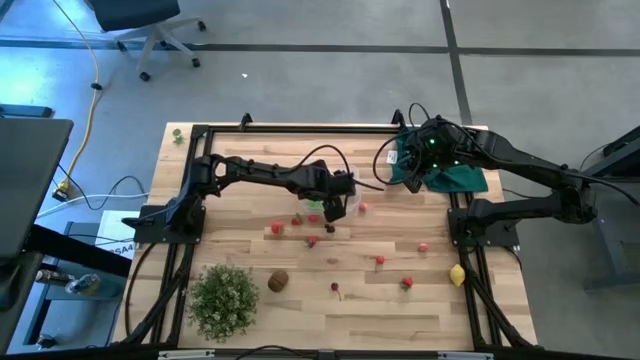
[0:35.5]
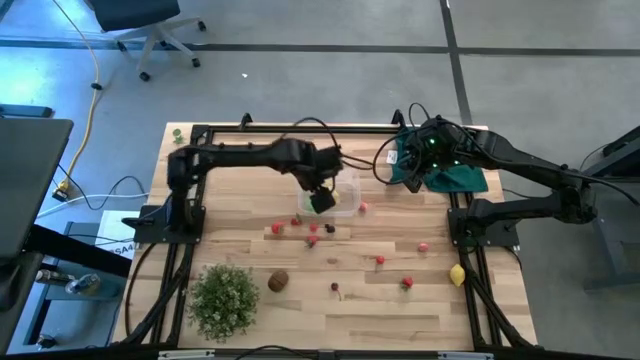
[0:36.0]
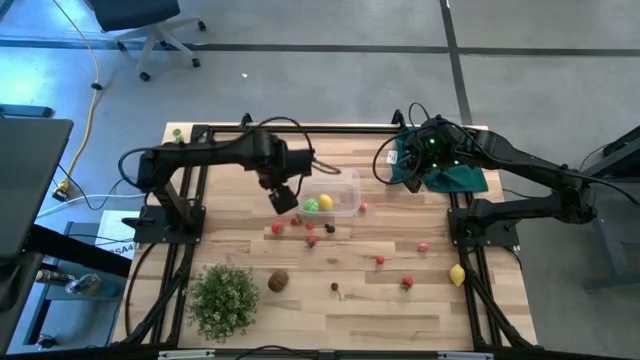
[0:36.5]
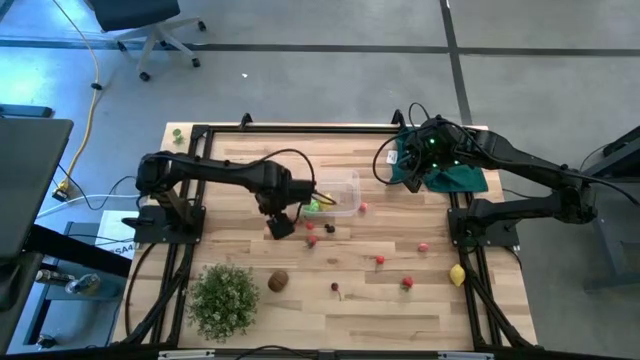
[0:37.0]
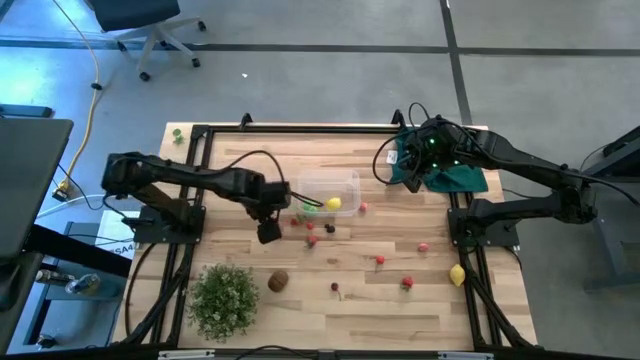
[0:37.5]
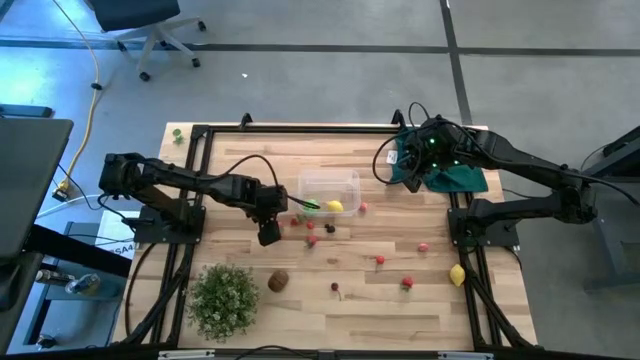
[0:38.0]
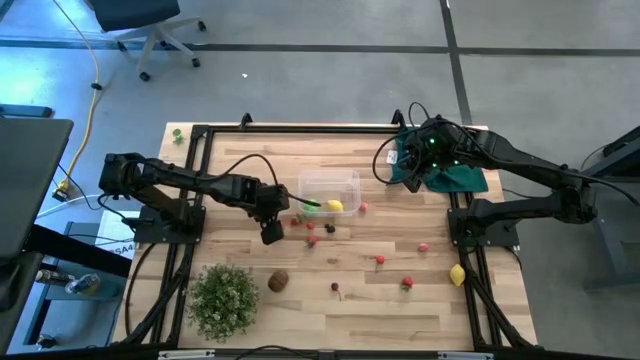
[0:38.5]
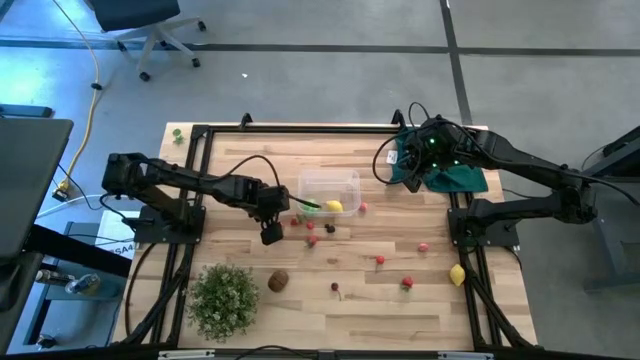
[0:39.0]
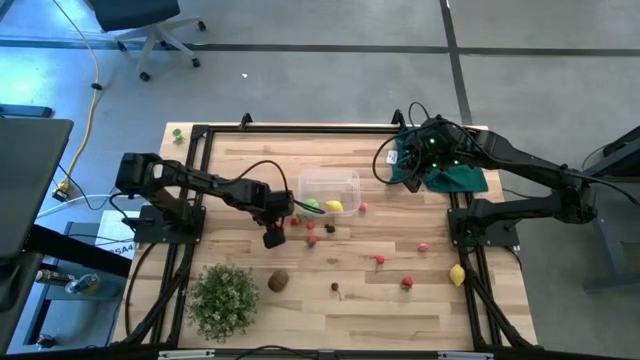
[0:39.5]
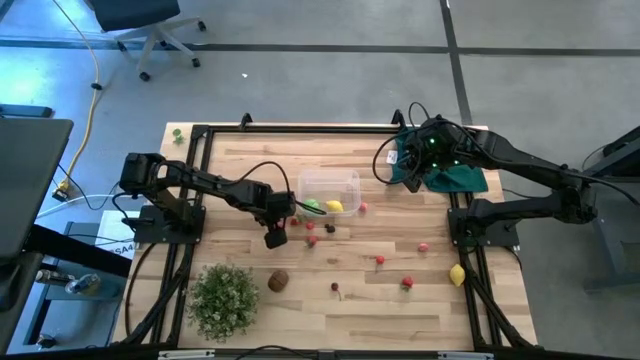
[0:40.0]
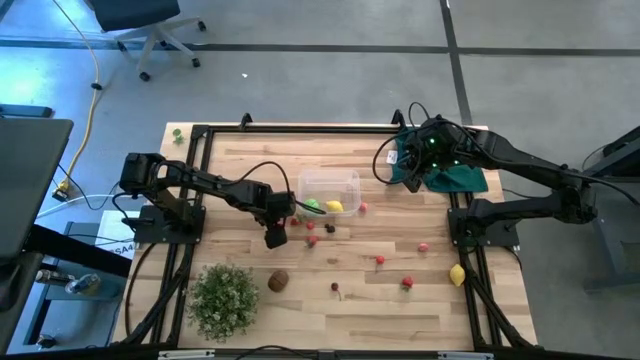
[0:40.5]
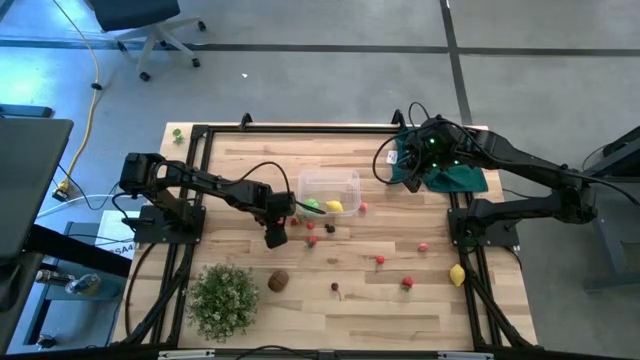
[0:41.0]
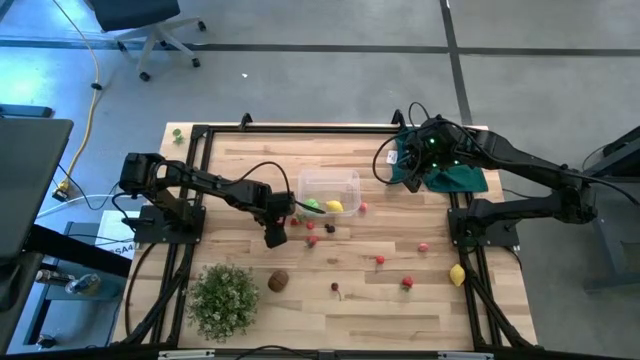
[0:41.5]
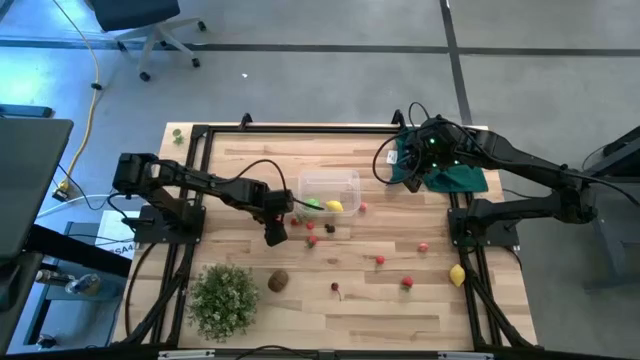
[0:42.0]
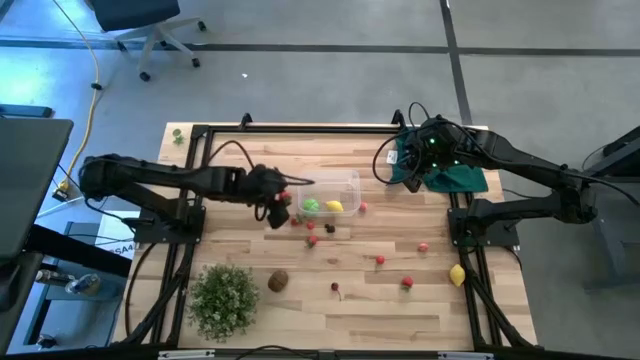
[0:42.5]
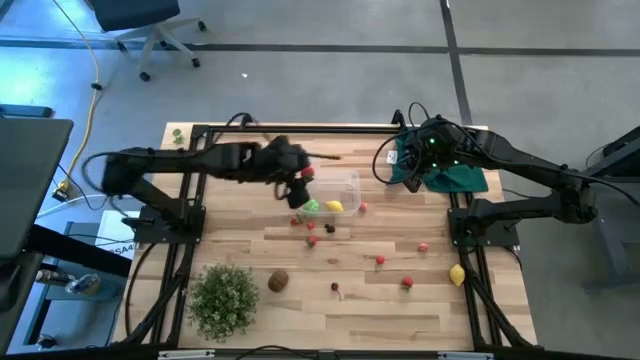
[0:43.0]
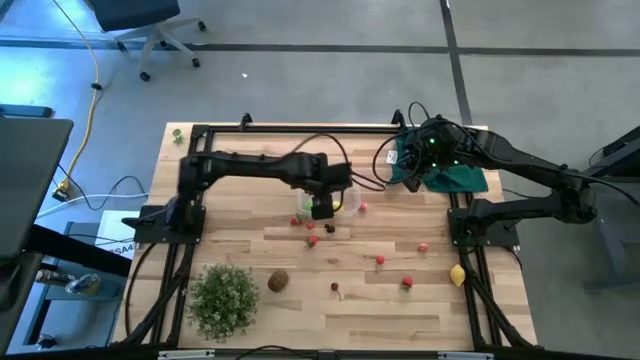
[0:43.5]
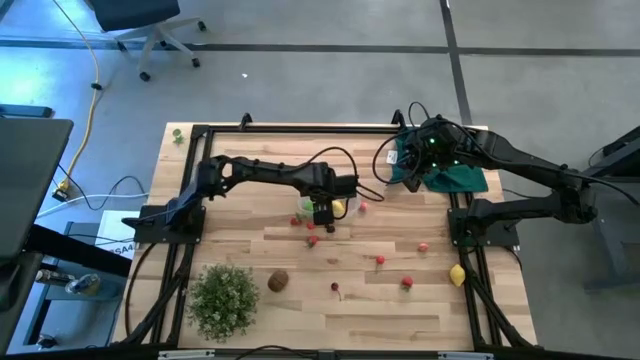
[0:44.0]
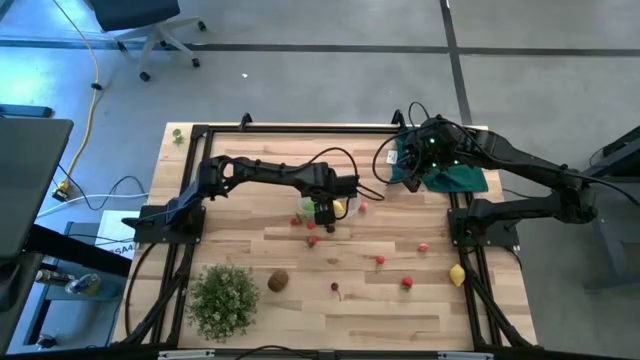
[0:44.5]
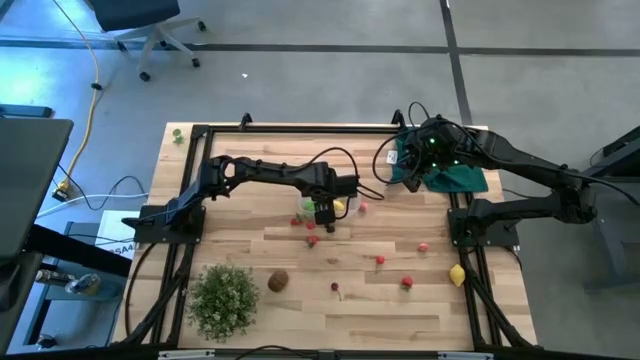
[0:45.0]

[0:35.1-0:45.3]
Task: Pick and placing Produce into tupperware
Put the red strawberry into the transparent bin

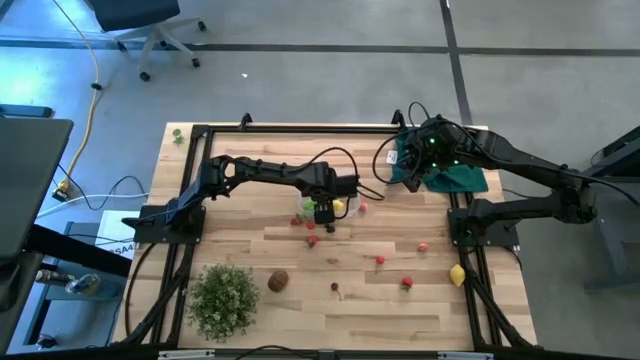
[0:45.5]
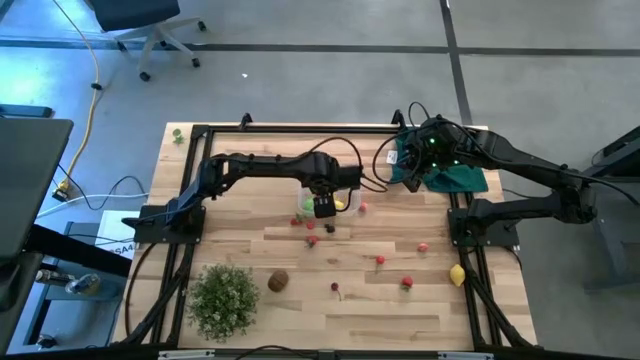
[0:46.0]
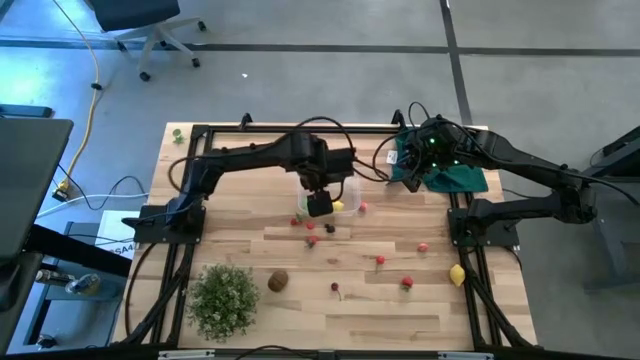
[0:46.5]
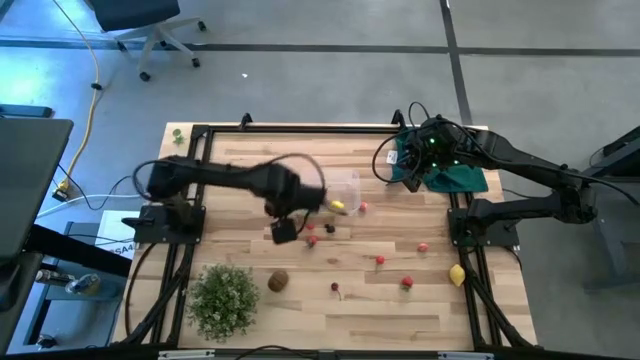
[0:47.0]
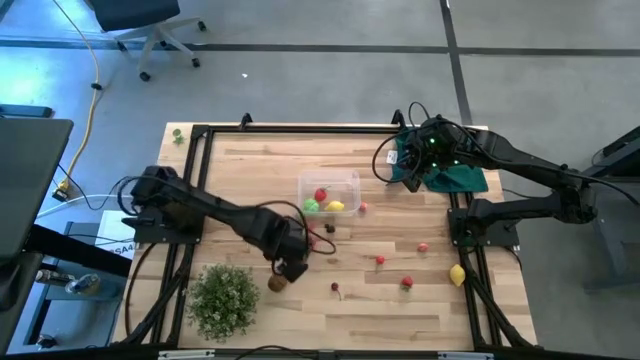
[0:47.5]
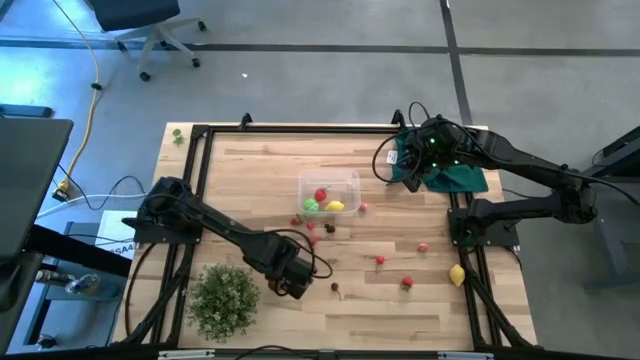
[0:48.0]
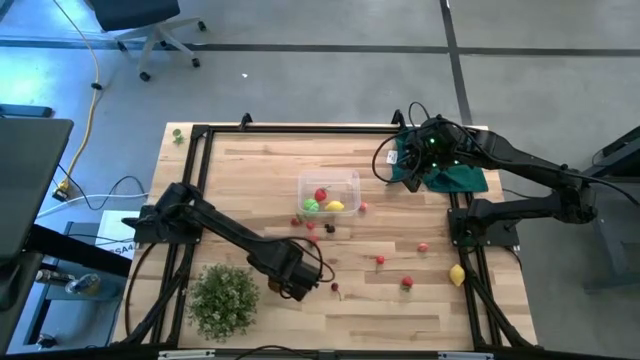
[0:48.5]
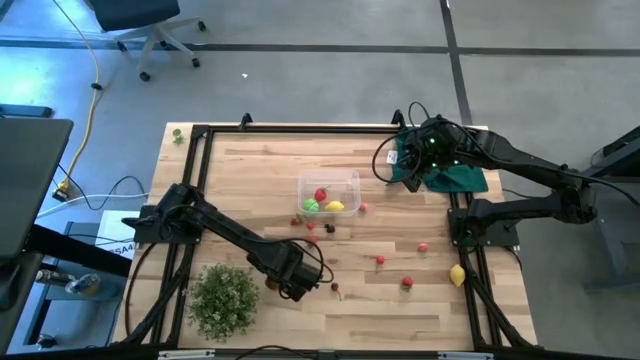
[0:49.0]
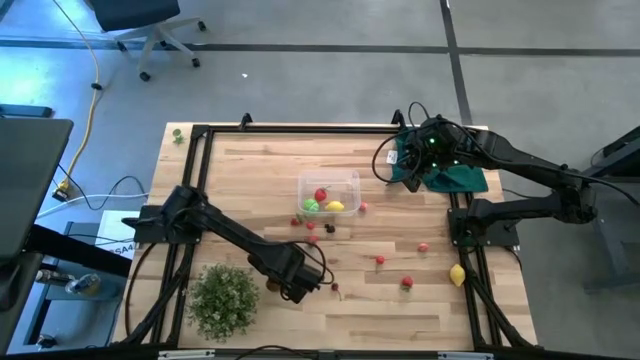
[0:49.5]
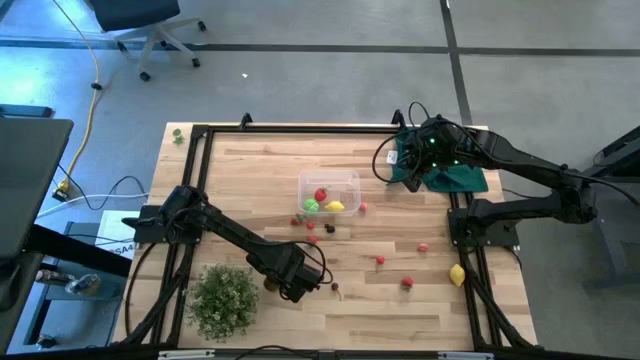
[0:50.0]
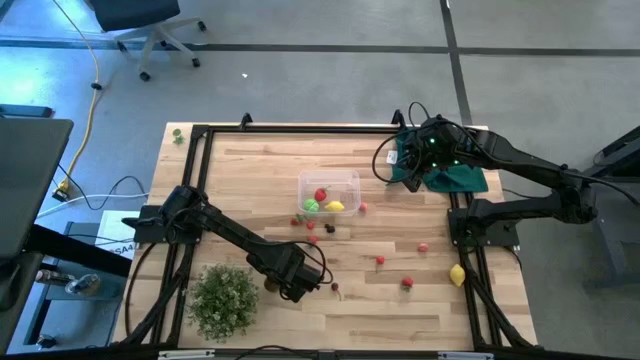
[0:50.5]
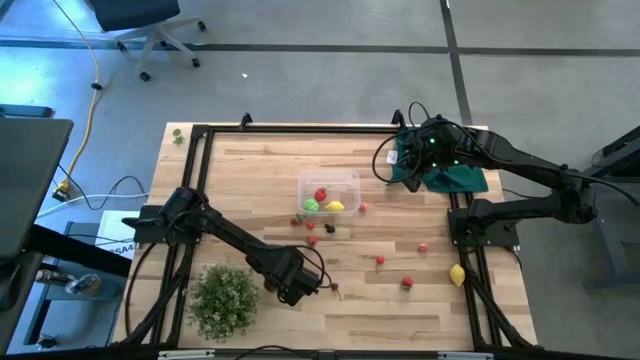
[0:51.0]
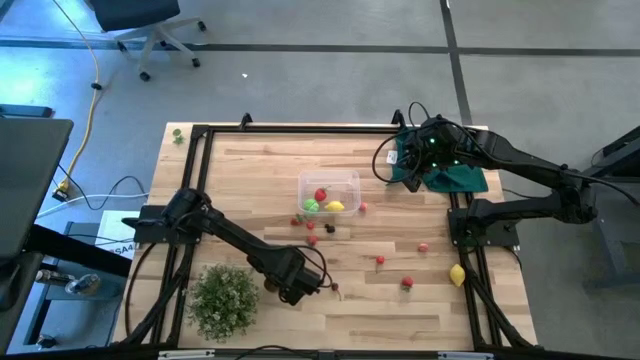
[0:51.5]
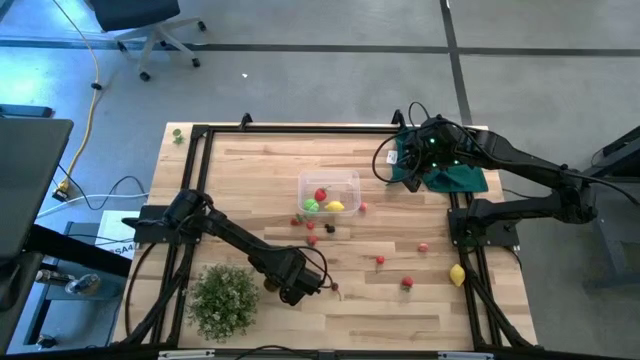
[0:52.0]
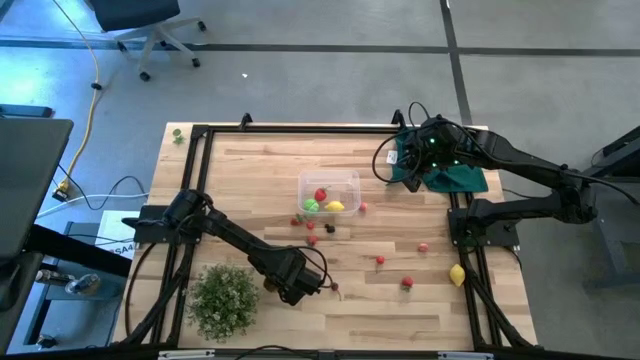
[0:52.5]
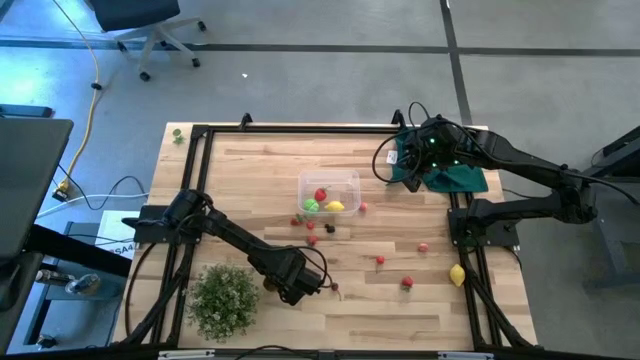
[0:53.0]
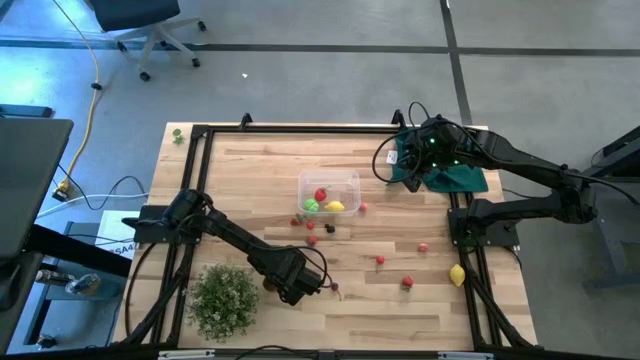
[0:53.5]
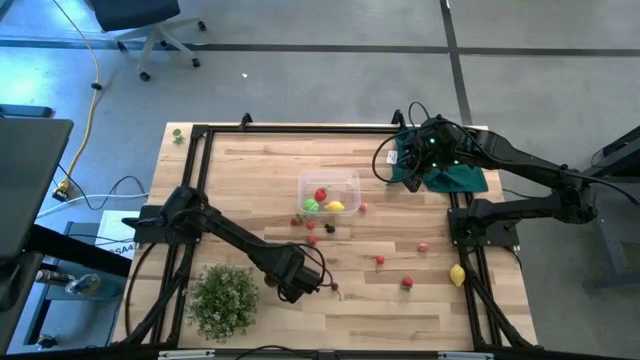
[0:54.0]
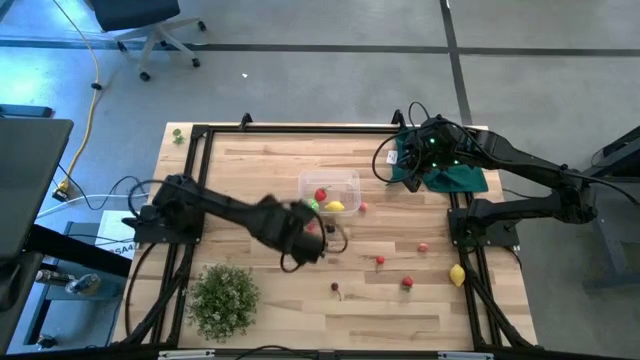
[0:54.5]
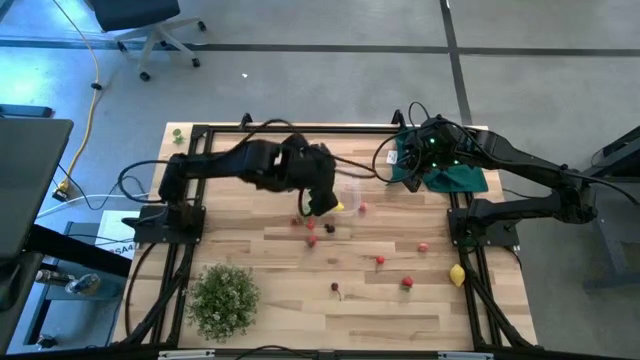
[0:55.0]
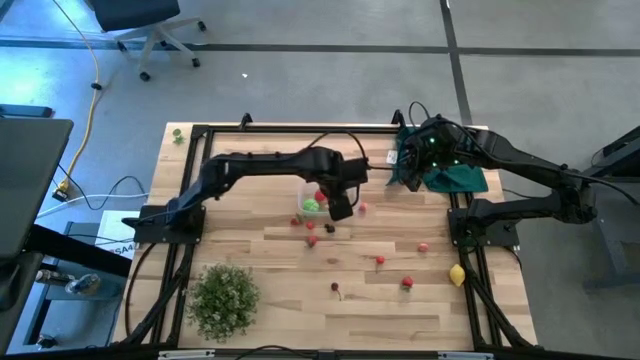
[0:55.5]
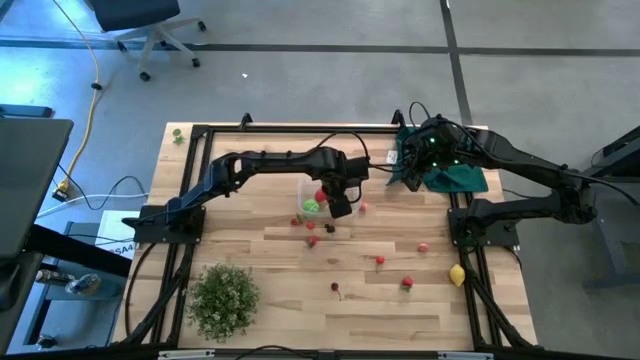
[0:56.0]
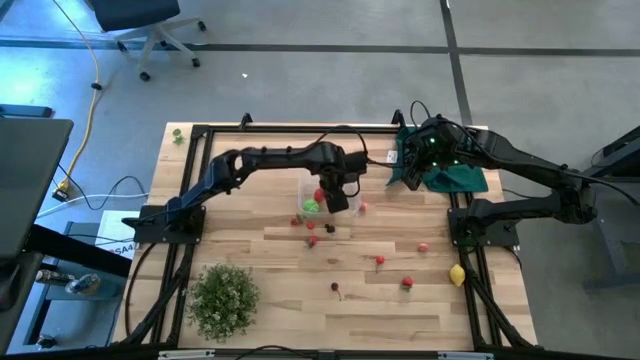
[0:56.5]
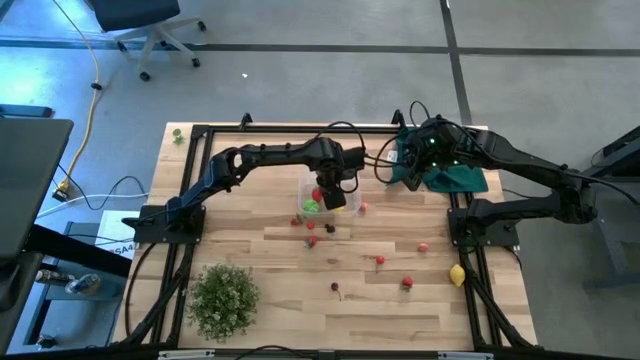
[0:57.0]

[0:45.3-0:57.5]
Put the brown kiwi into the transparent bin
